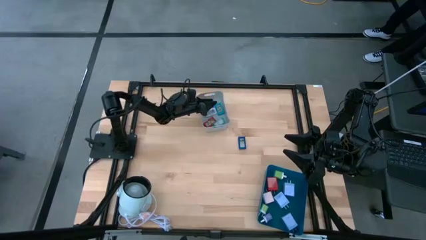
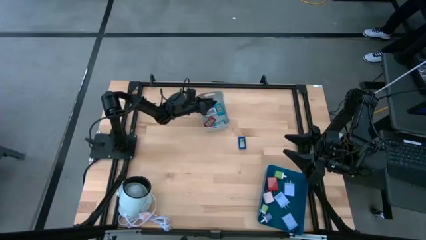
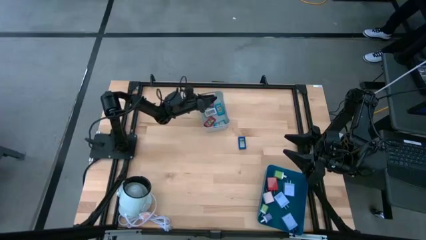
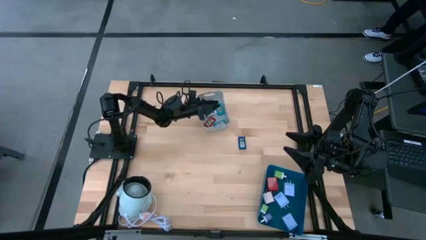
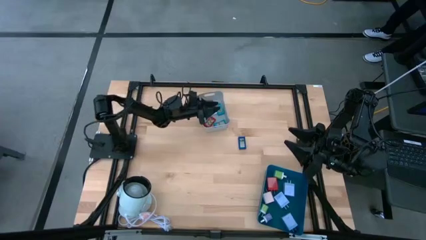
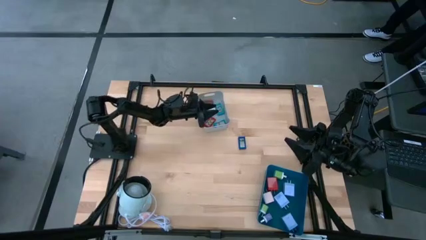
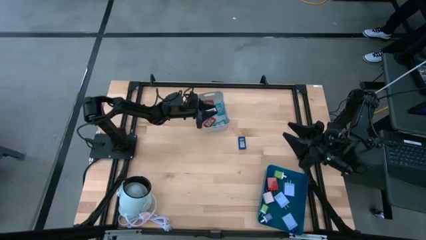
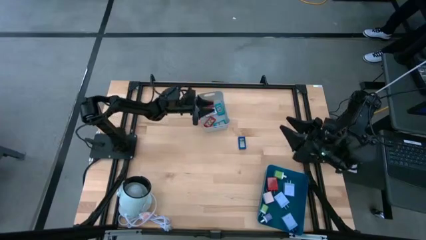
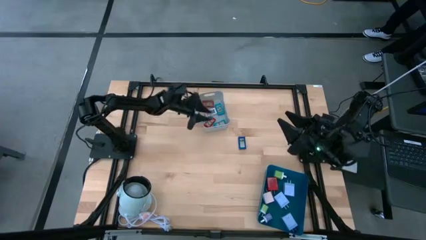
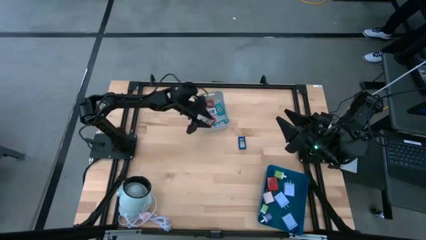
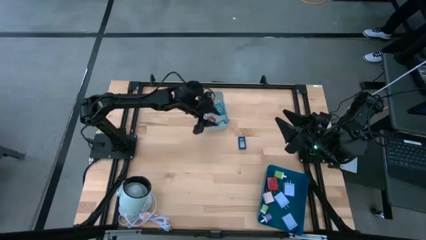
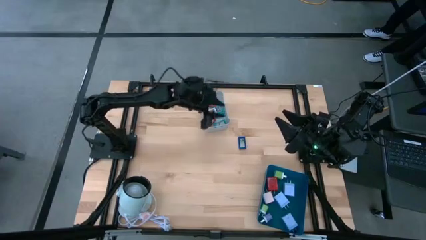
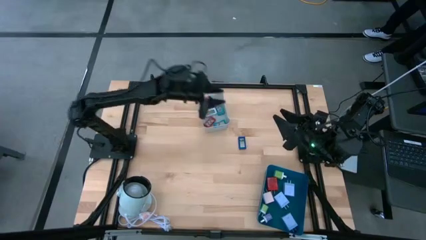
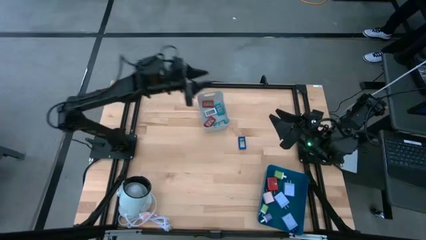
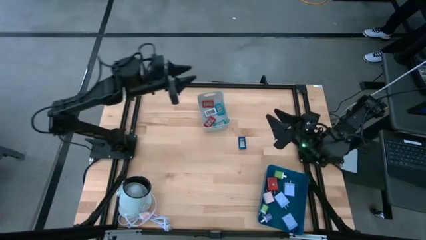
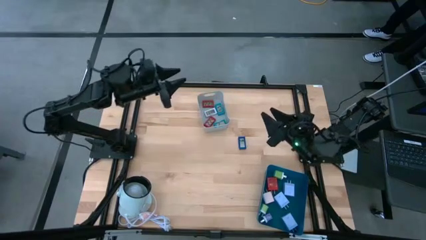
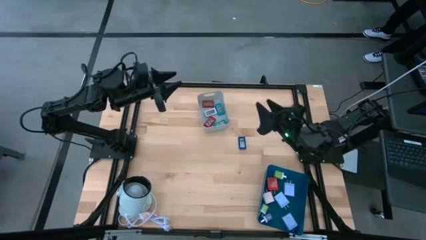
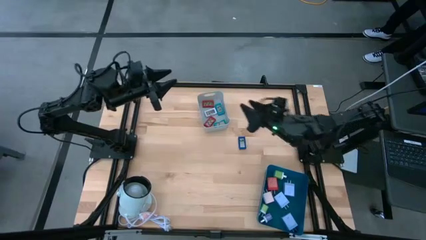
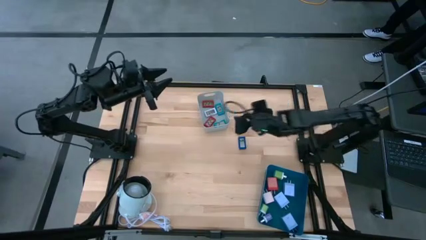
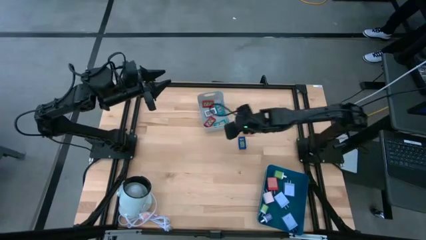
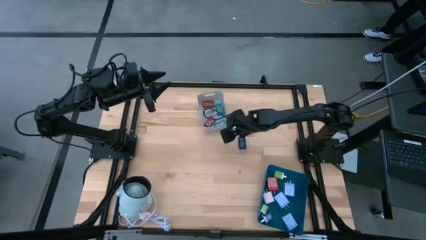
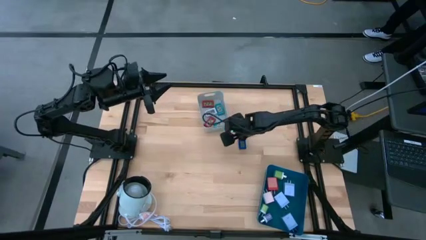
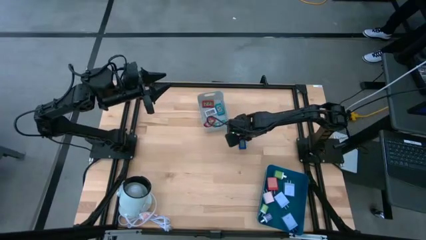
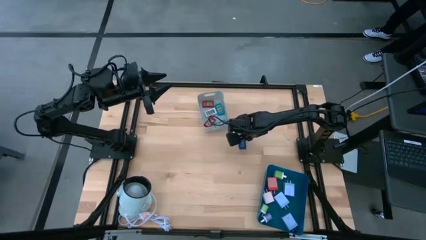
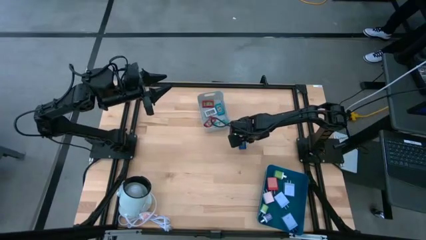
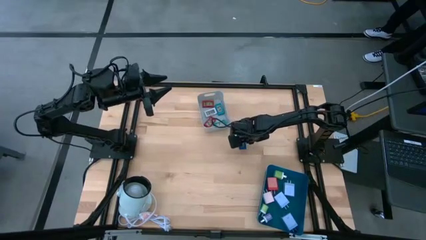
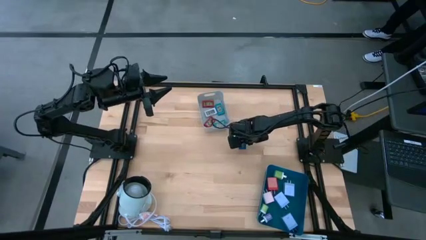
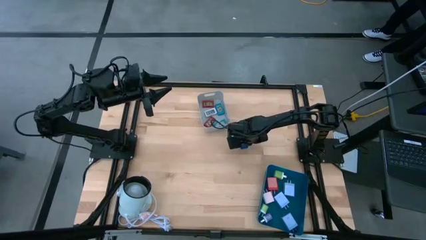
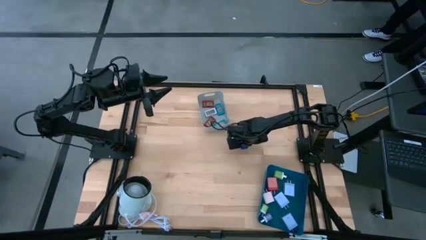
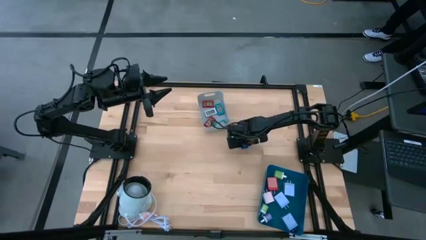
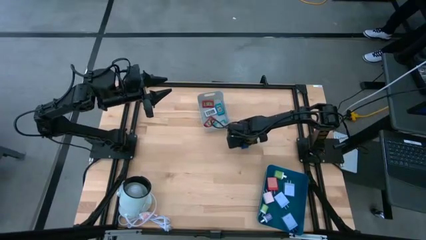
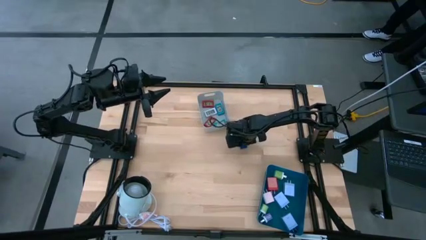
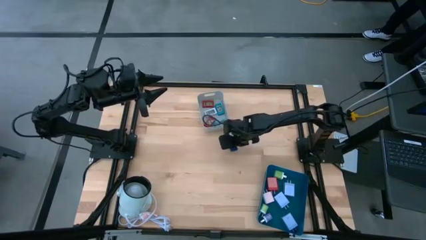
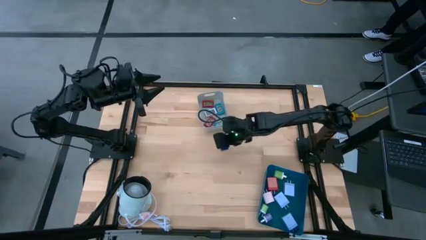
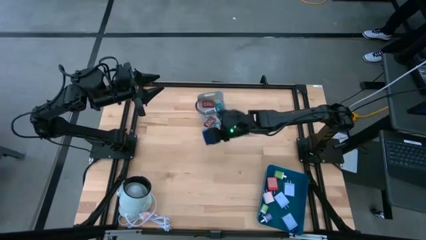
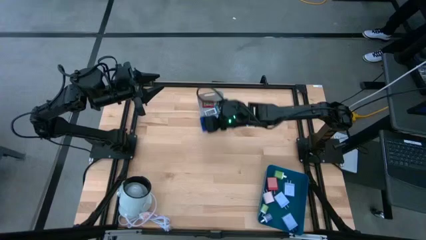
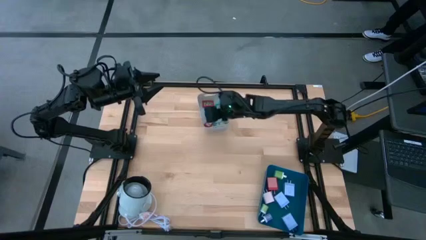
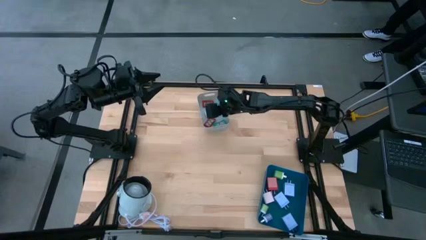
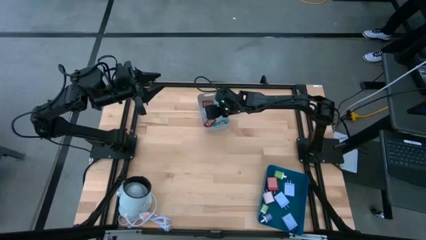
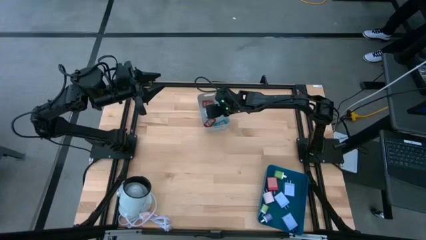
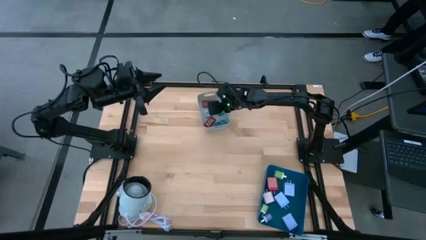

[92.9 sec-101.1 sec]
Task: Pick & Place Office items
Put the blue digital clock into the gray bin

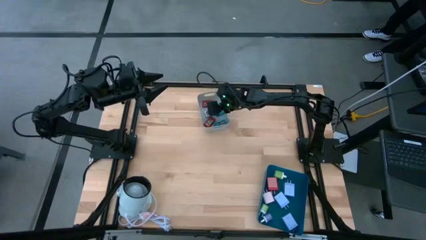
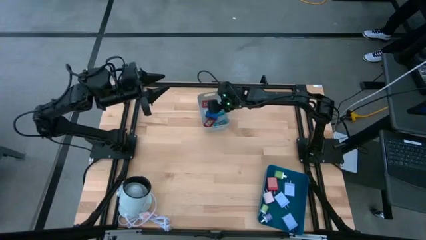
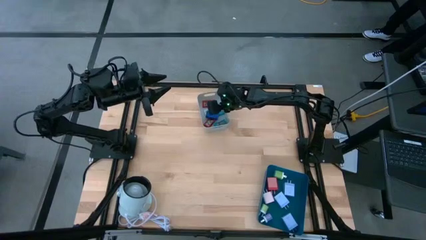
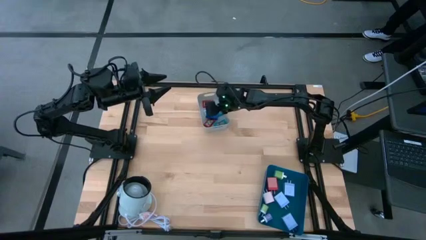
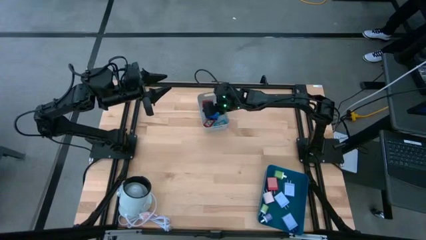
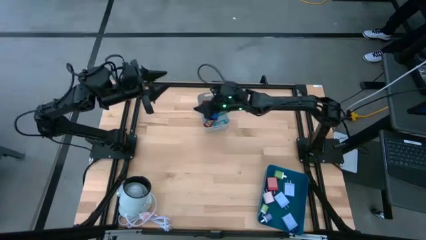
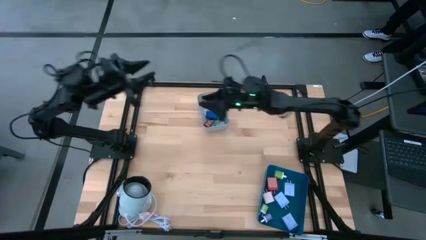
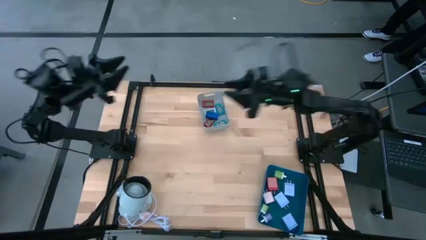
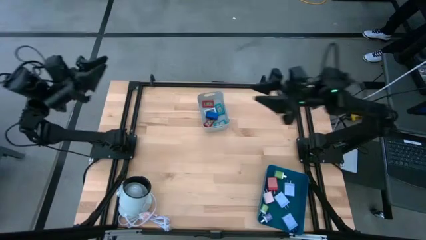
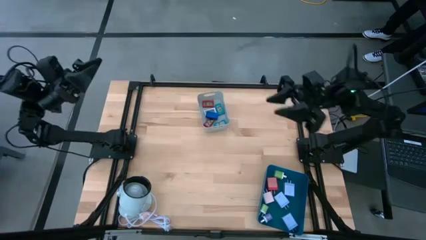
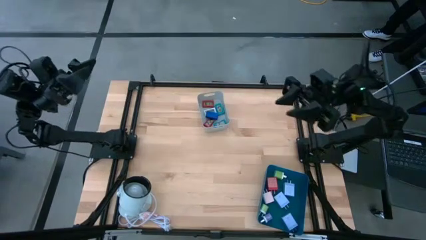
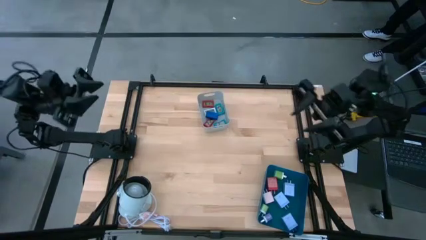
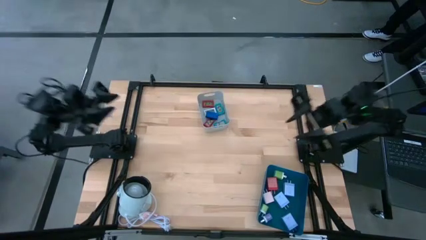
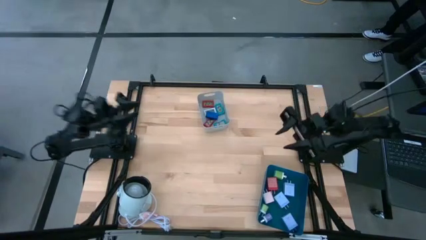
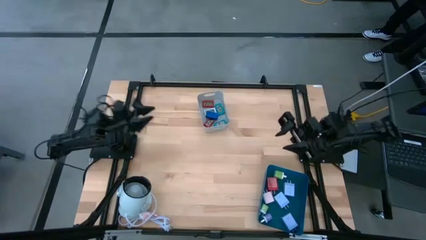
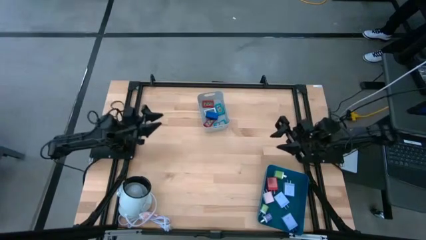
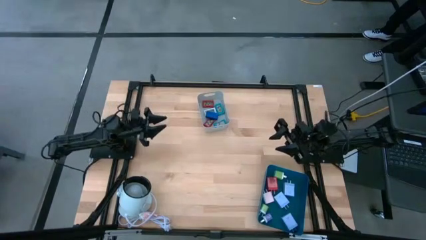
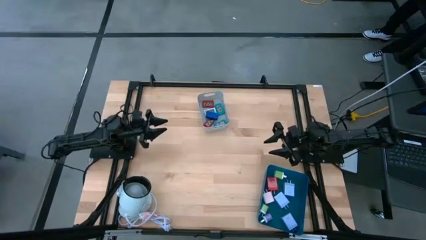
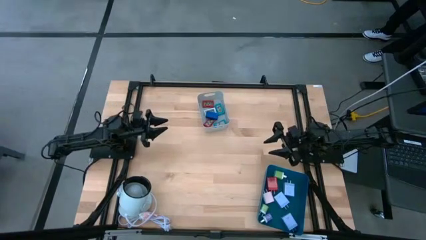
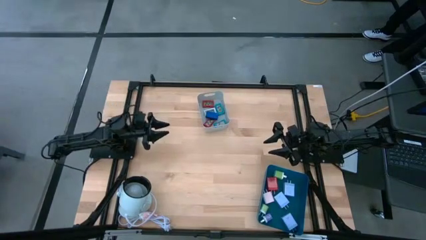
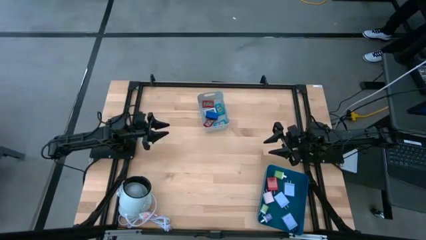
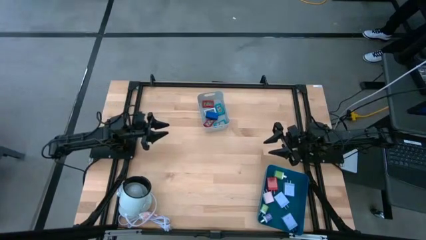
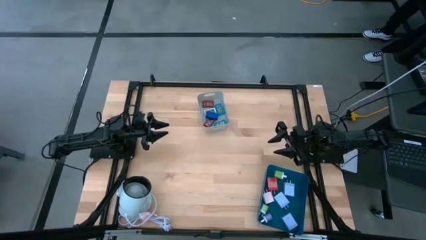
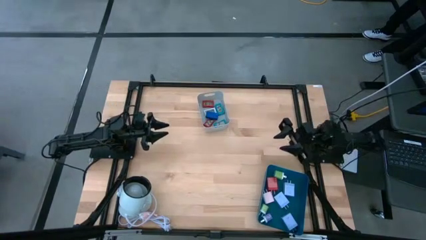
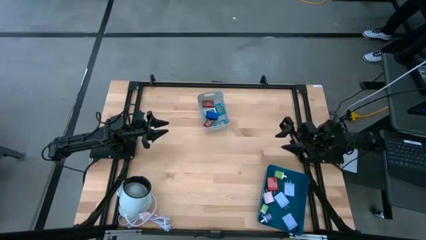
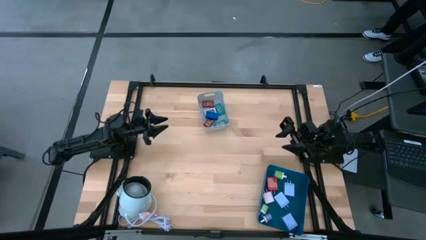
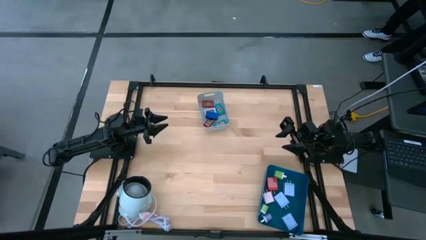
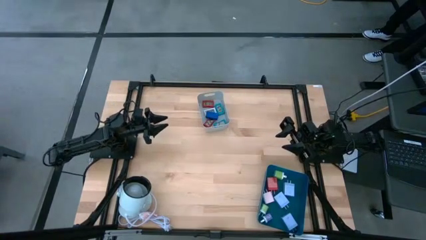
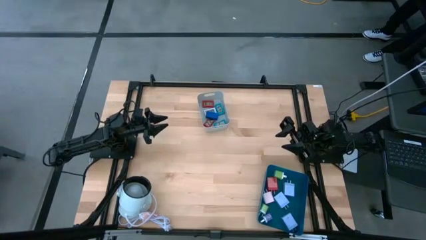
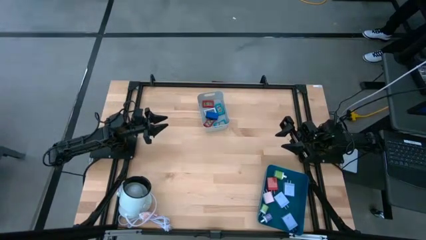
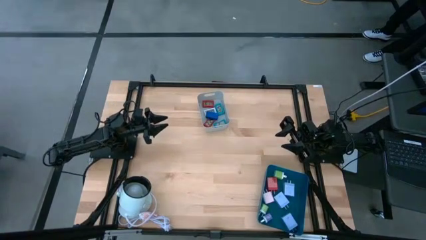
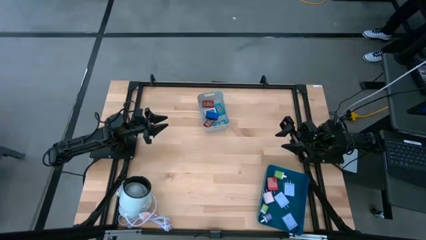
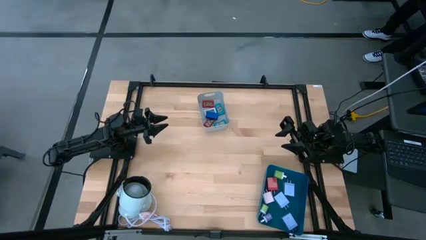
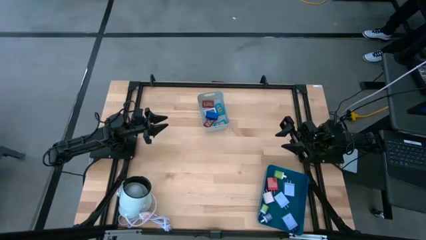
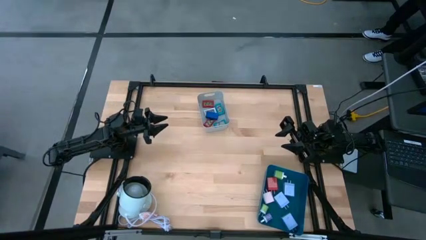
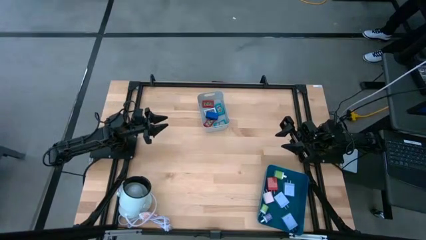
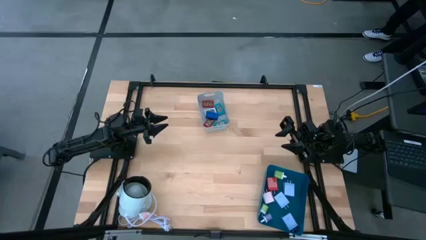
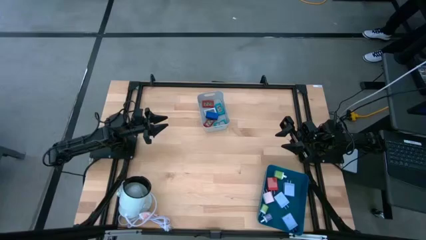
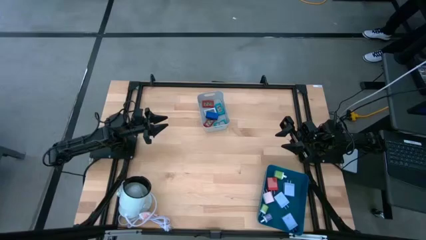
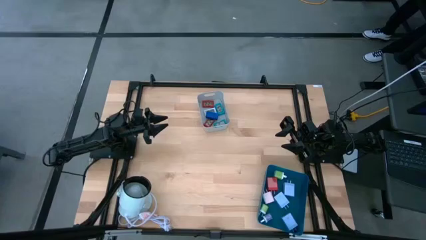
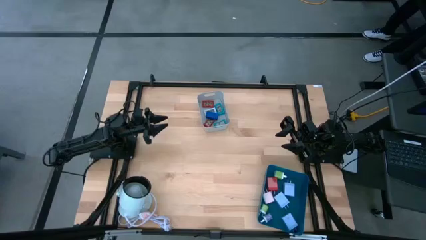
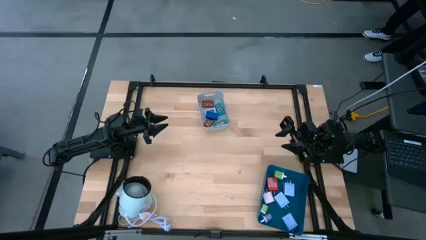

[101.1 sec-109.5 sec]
Return to Home Position
